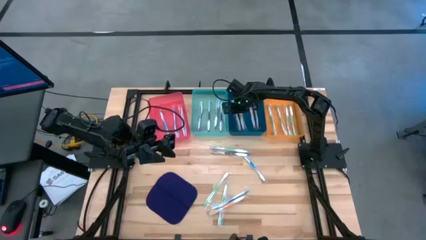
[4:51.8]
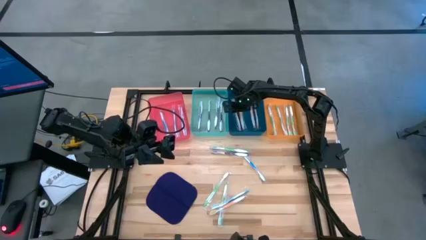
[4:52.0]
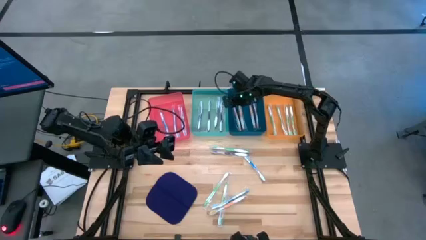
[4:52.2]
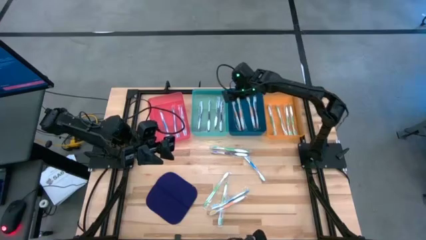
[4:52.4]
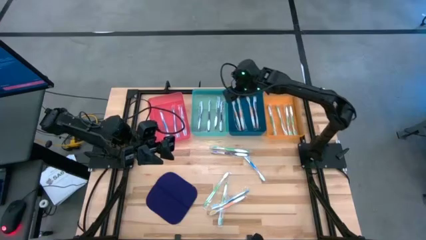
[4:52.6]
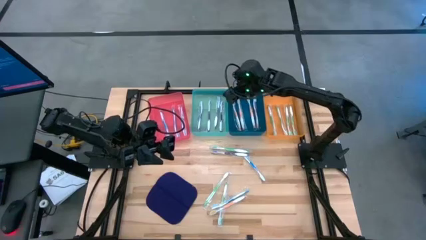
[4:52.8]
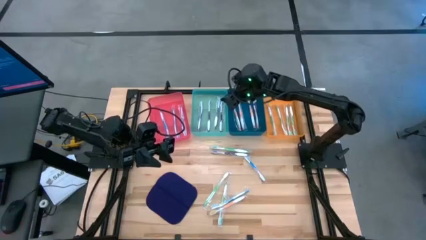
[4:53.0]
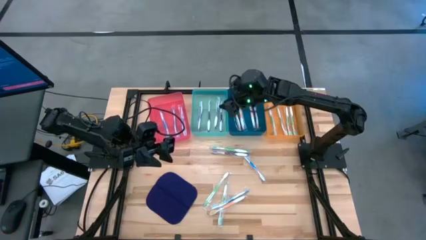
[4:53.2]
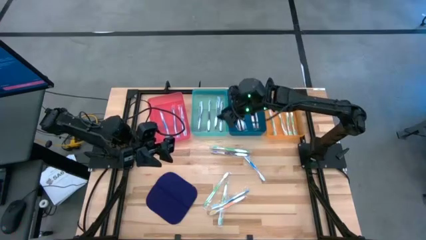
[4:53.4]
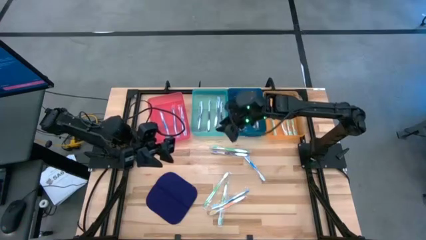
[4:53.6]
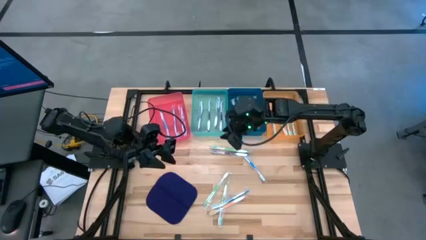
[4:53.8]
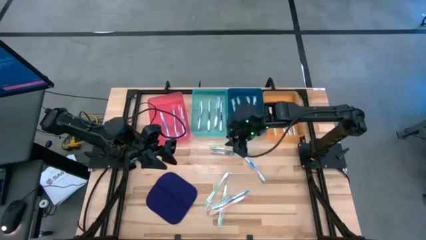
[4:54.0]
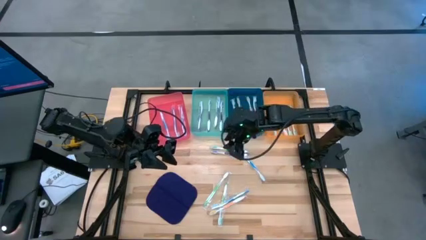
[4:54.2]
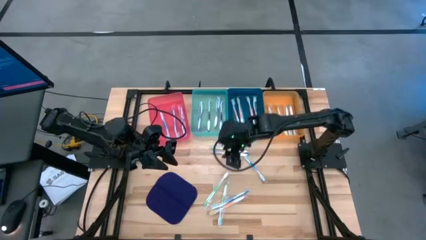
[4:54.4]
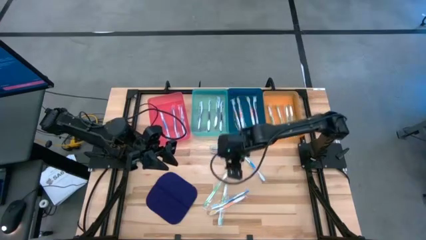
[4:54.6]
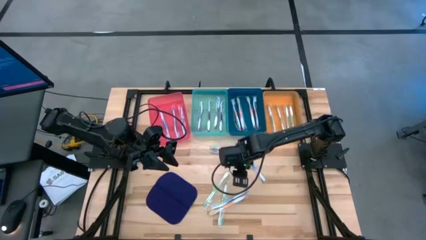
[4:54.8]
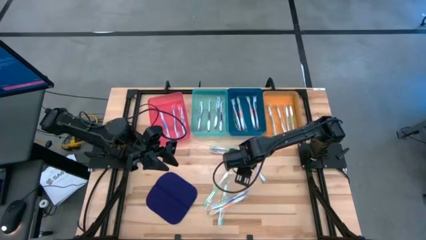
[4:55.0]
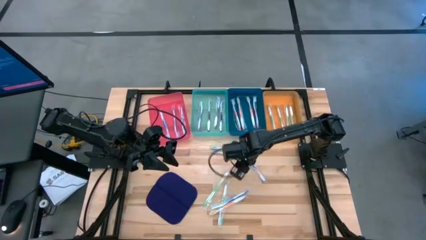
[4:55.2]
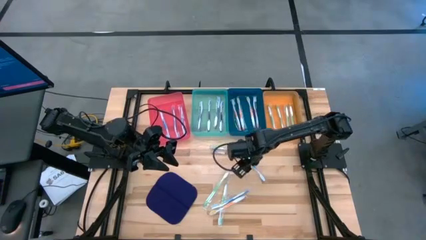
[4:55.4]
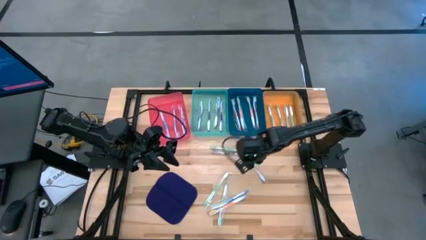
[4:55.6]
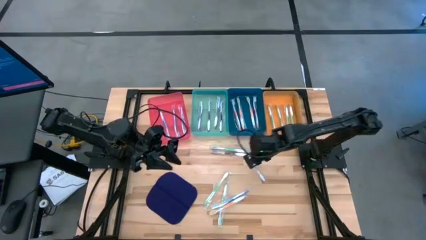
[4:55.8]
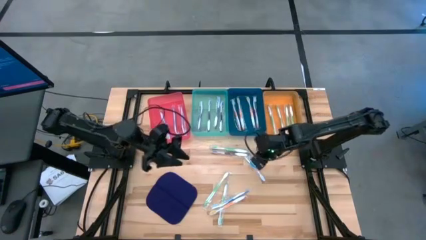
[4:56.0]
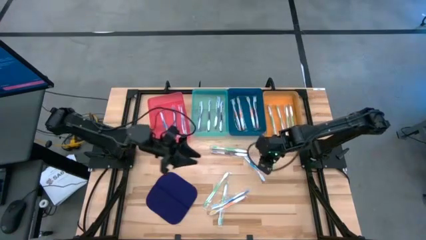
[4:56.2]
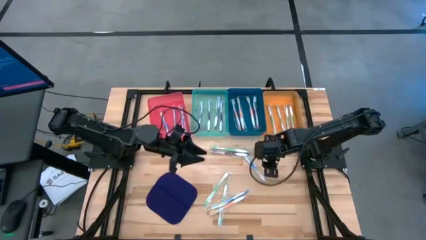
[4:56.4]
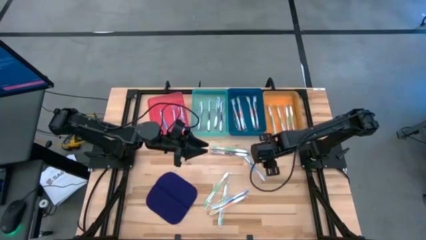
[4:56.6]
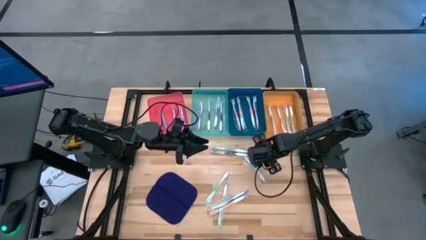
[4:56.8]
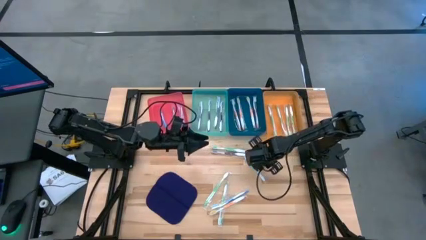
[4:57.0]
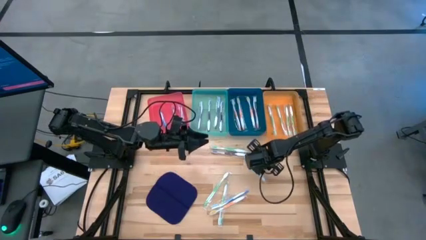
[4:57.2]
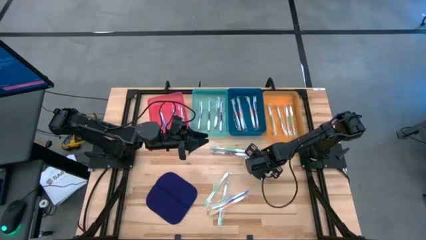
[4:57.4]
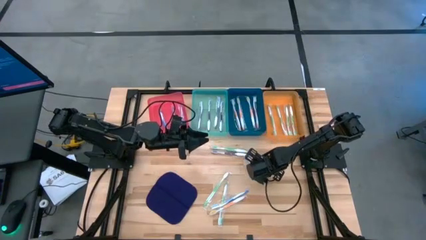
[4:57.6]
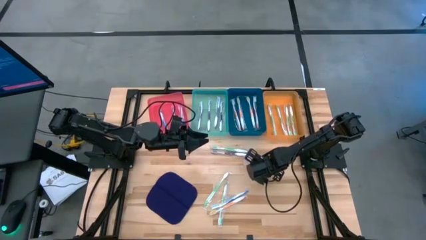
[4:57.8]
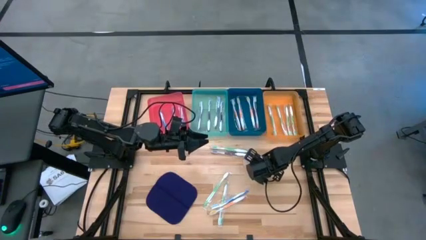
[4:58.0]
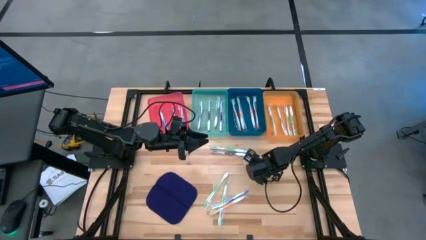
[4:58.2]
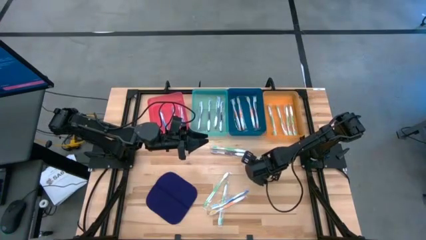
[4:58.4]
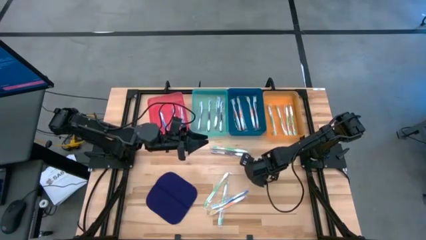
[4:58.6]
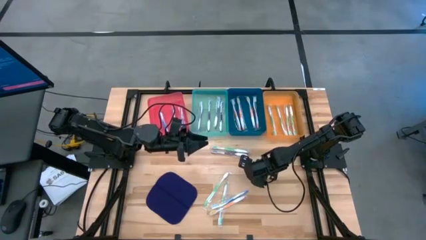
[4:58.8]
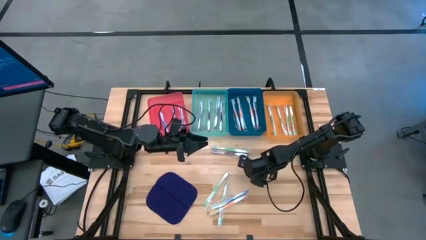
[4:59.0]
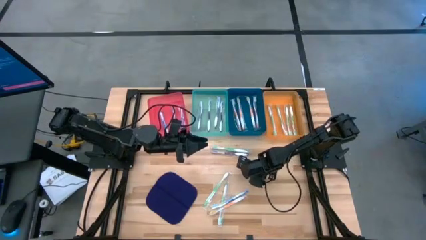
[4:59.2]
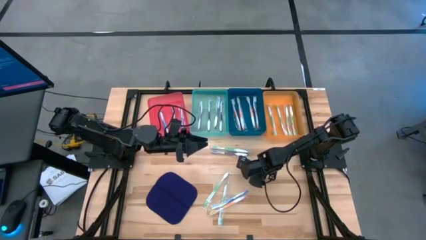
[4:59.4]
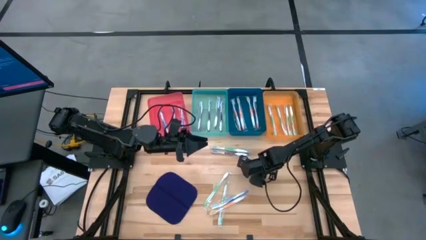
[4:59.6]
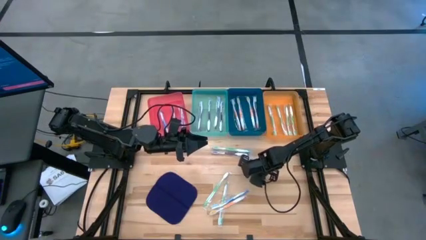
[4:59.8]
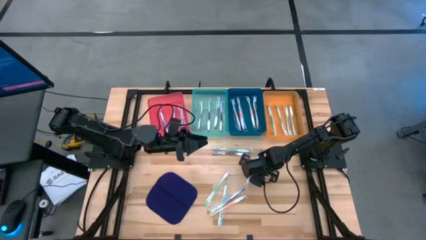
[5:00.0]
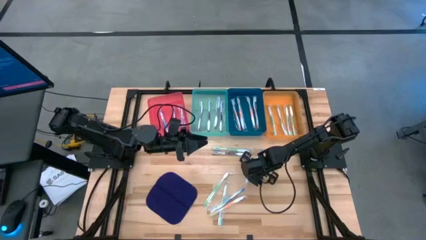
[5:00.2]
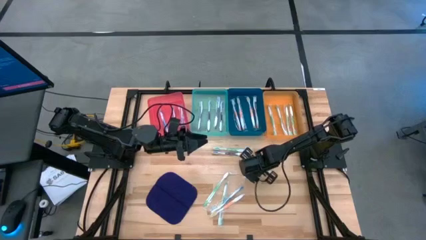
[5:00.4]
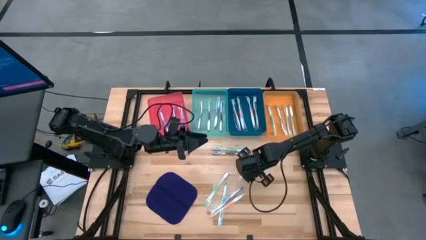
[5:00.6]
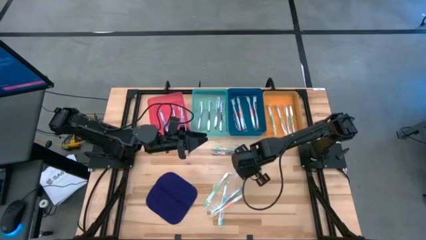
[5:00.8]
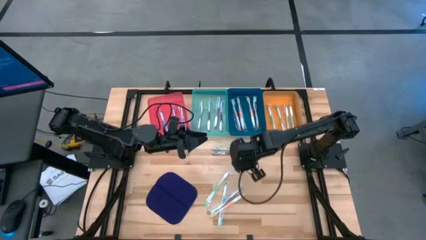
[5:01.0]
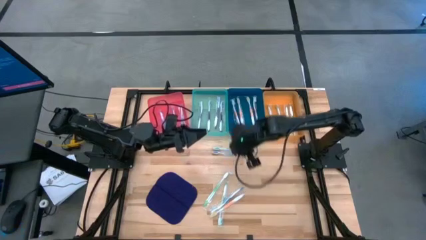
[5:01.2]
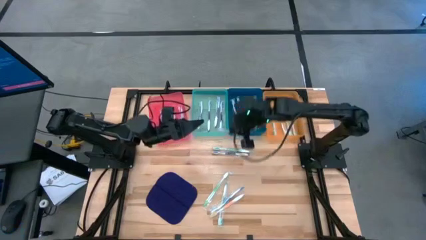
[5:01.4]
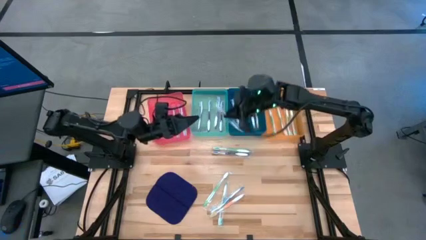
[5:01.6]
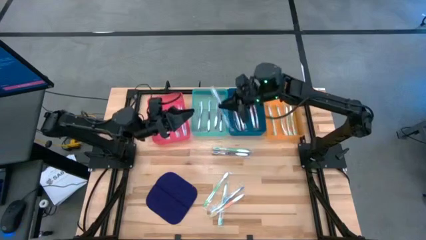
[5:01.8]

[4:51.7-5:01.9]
Task: Pick & Place Toothbrushes
Put the blue toothbrush into the red bin

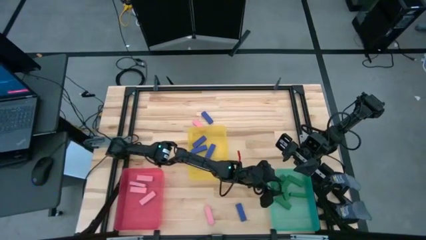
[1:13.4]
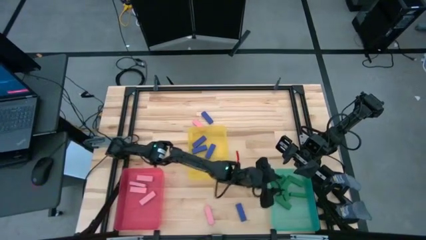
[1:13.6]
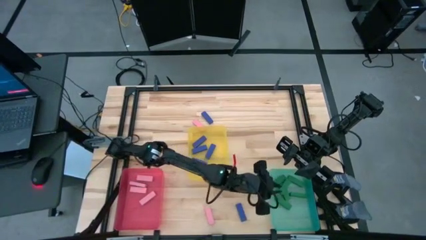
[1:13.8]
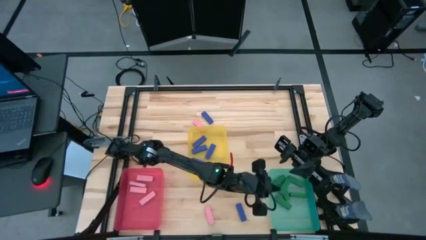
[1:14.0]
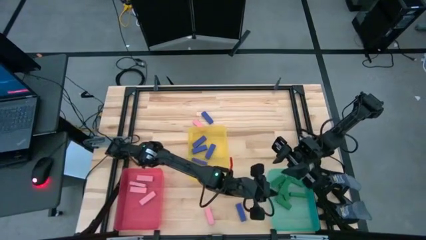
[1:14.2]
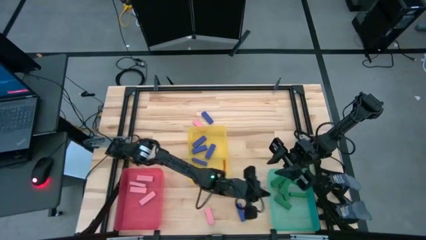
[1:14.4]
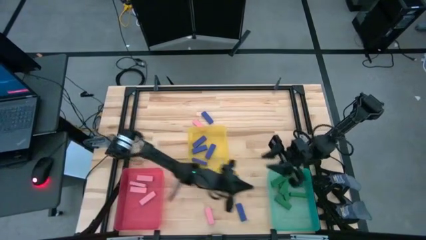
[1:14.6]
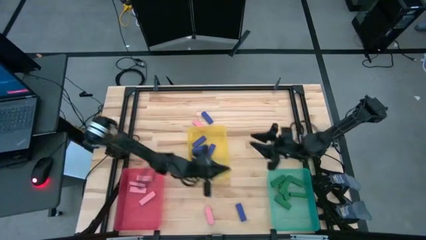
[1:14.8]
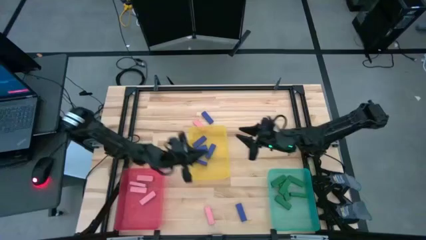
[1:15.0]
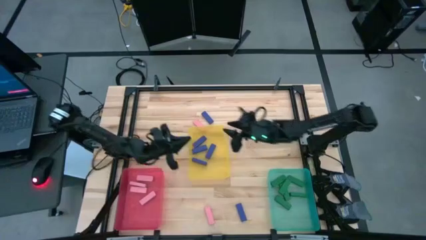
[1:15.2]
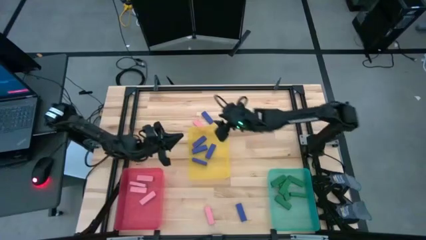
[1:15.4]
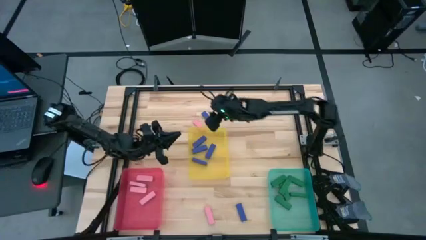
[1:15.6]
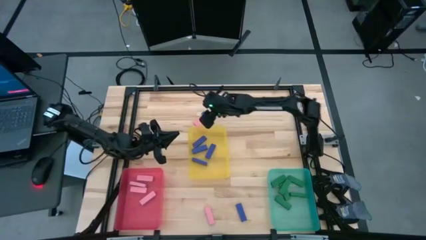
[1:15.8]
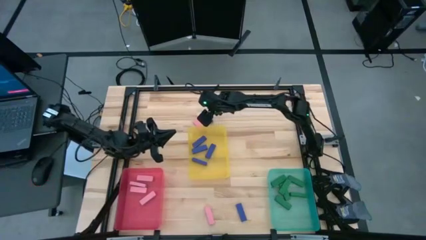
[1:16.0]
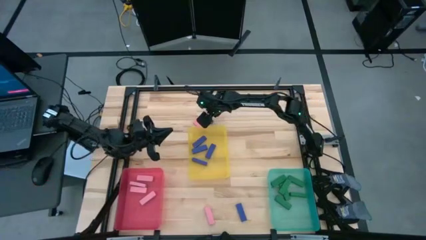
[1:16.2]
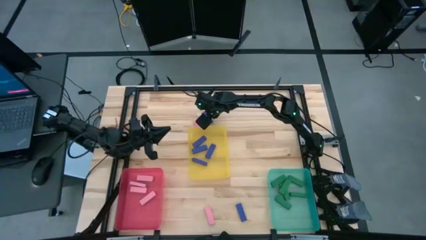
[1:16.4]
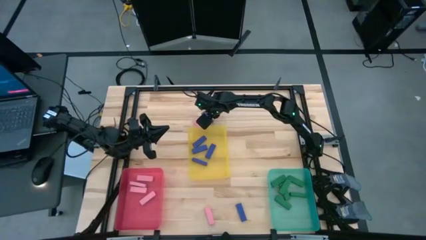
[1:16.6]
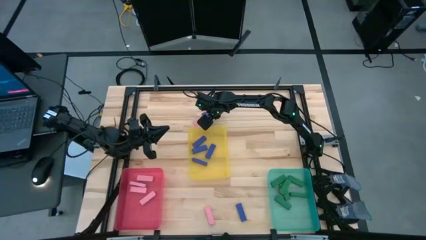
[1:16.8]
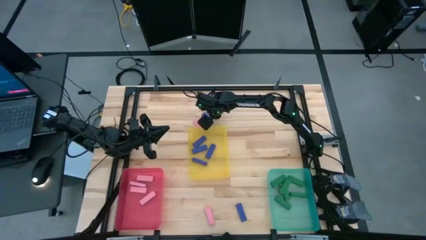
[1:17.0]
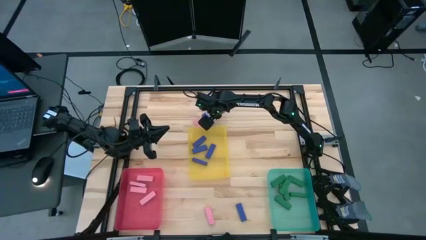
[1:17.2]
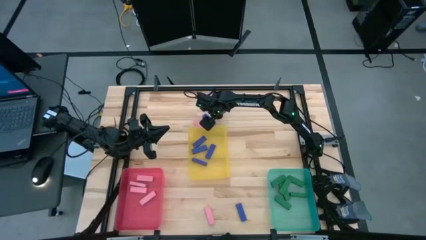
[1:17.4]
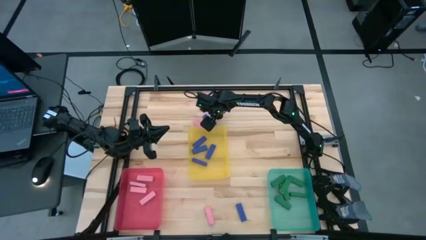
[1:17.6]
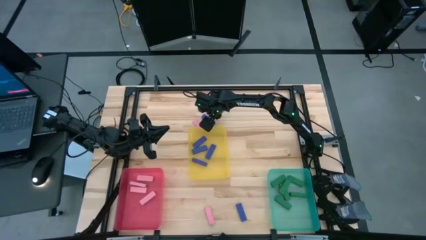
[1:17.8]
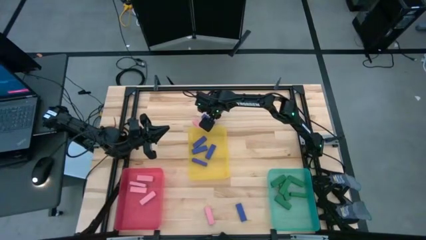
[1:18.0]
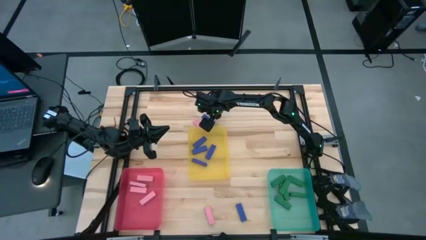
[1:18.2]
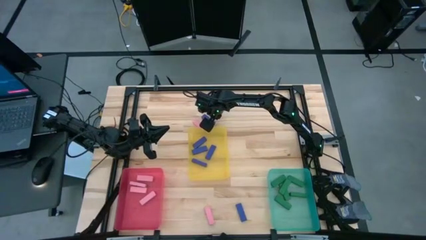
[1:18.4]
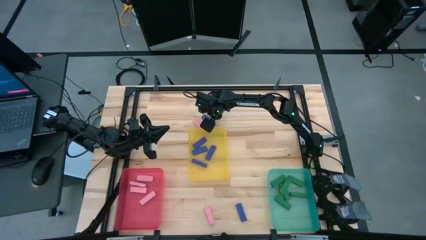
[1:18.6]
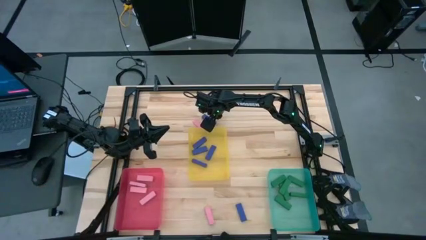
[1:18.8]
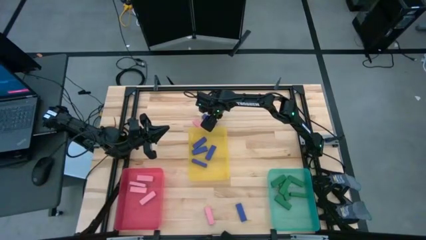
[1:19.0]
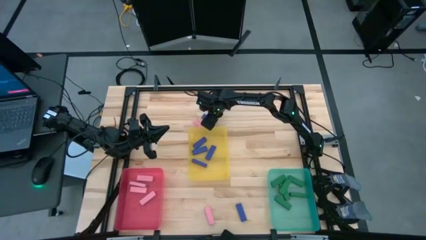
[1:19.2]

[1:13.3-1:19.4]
Task: Sort blocks
Put the top blue block into the yellow bin

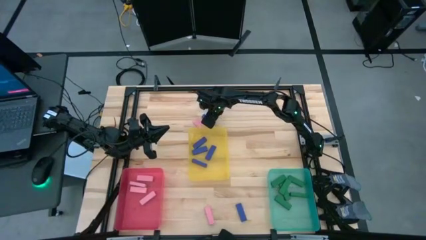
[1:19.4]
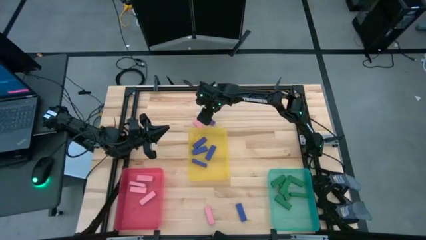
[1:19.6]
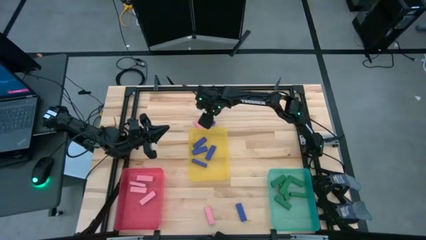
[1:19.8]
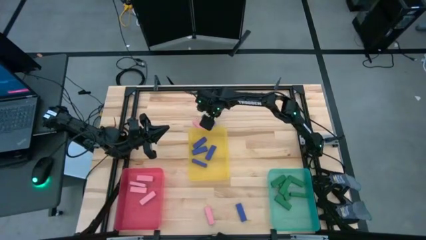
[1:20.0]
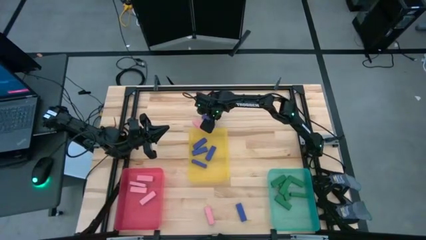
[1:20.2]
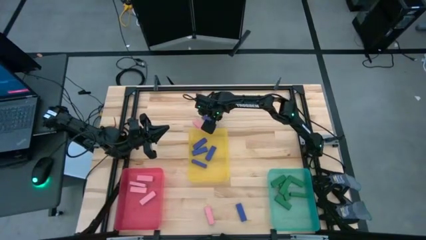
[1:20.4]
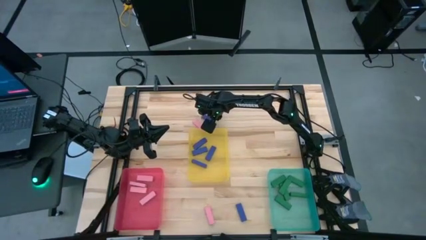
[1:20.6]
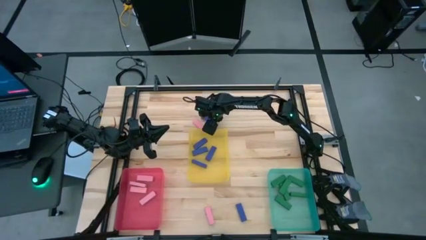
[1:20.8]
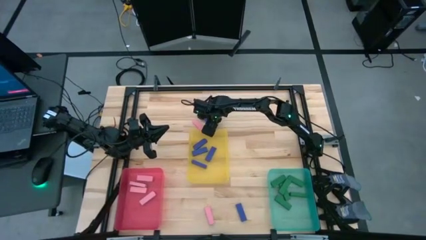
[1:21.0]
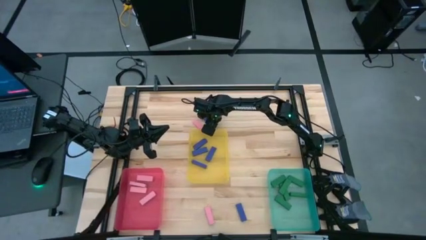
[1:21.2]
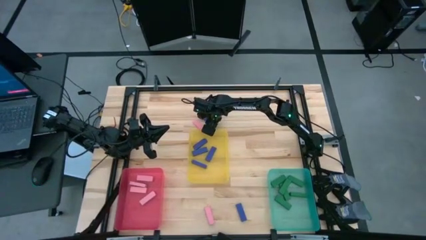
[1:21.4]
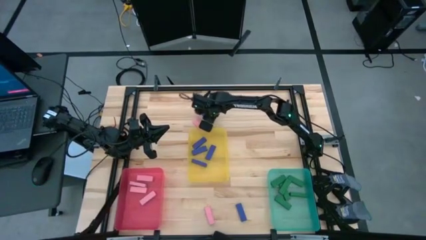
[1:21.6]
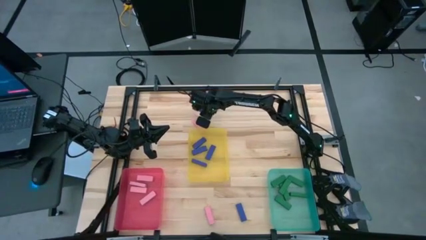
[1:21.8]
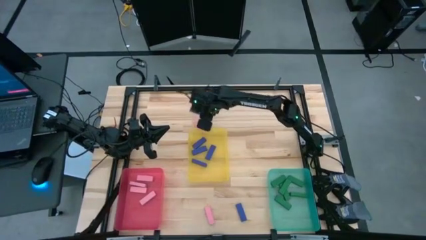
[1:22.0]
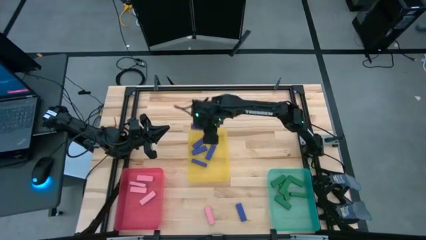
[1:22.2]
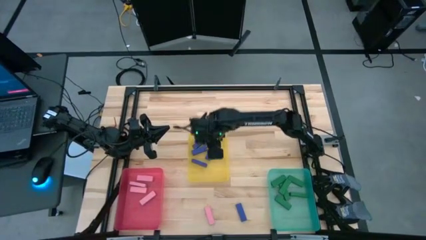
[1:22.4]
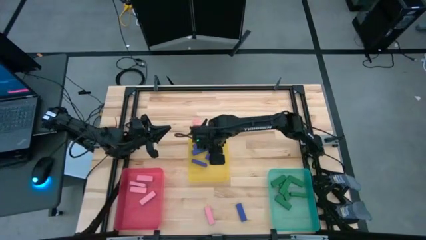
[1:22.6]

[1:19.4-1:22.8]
Put the top blue block into the yellow bin
